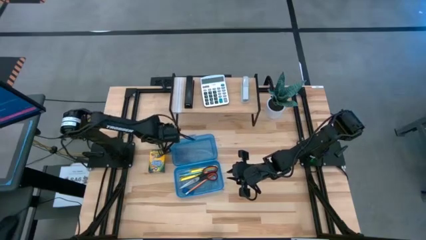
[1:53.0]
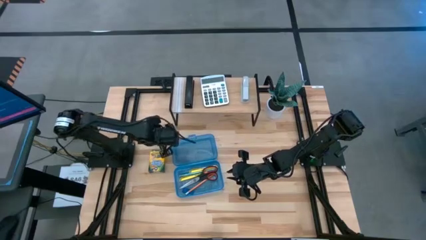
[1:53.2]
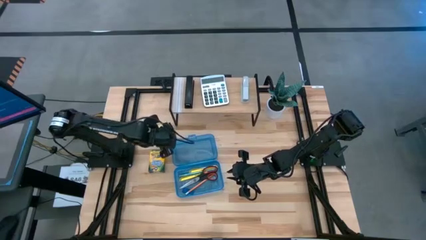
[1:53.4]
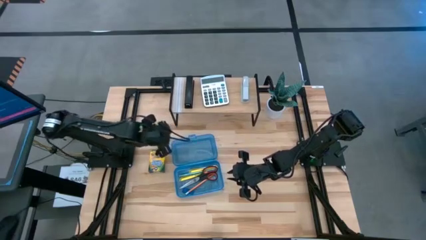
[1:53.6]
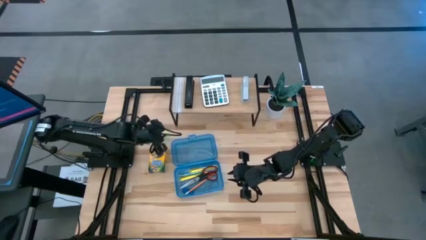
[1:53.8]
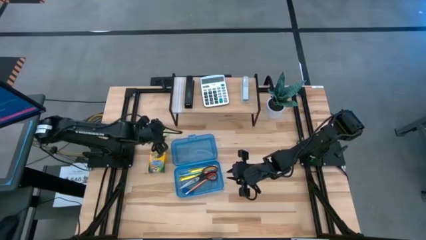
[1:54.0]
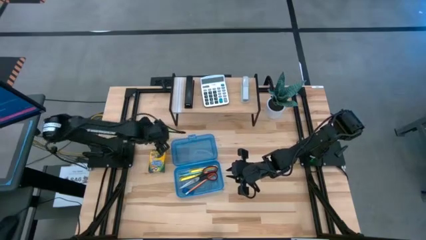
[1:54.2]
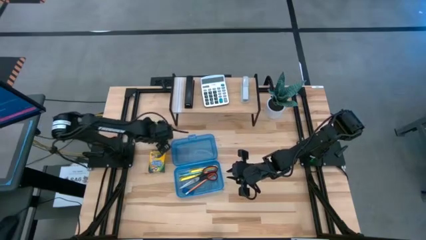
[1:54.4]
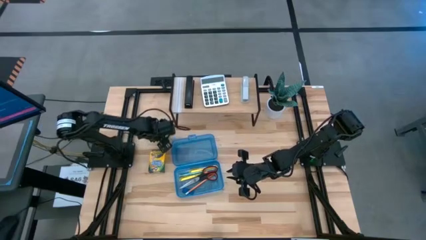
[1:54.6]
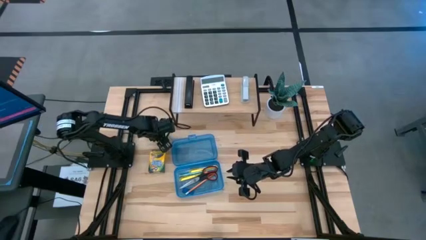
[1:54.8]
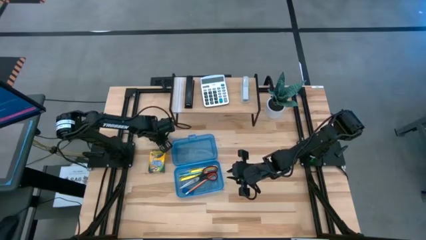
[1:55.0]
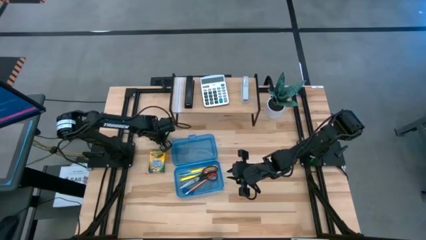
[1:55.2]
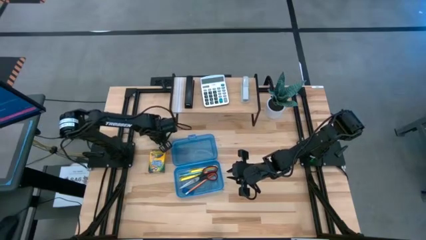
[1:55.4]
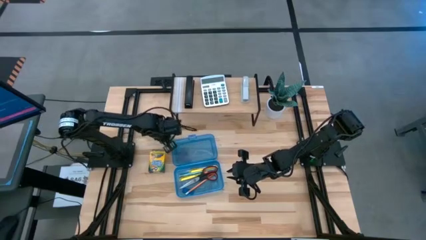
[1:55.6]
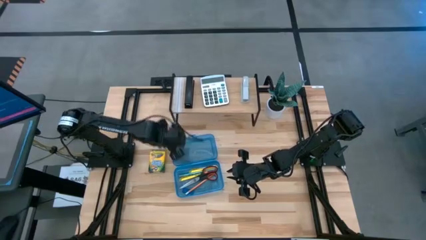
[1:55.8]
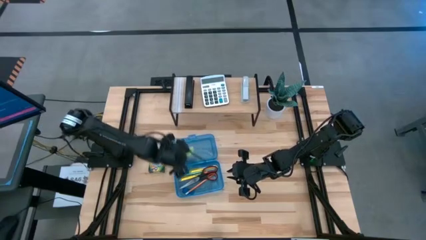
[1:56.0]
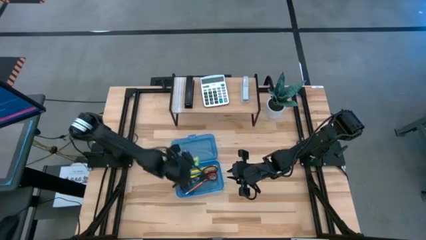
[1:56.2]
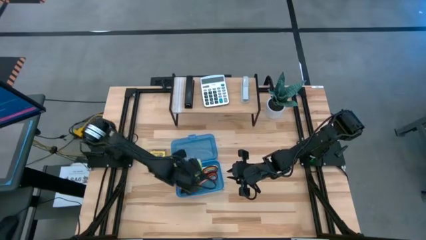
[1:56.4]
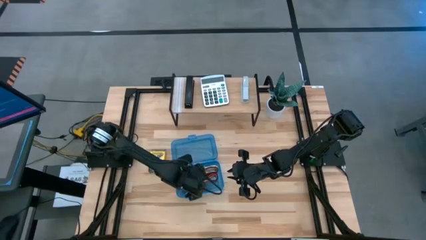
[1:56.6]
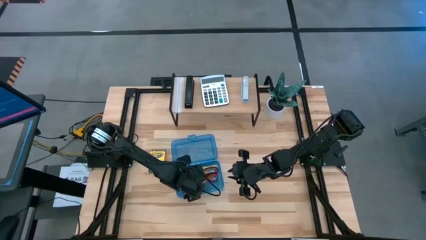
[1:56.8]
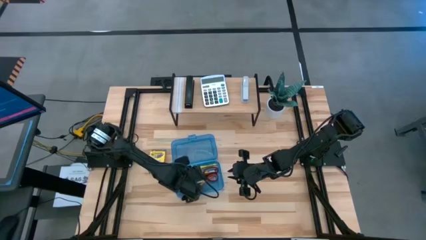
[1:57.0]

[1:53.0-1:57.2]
Task: Pack school essentials
Put the green sticky note into the blue supply box

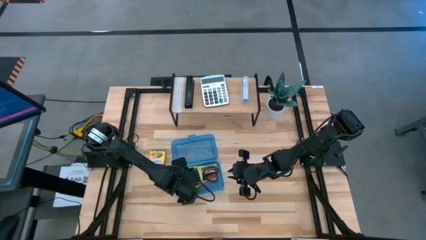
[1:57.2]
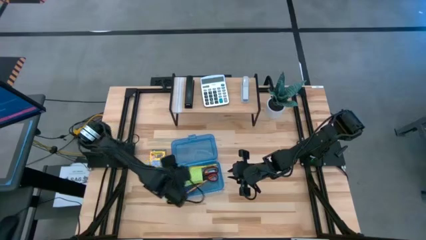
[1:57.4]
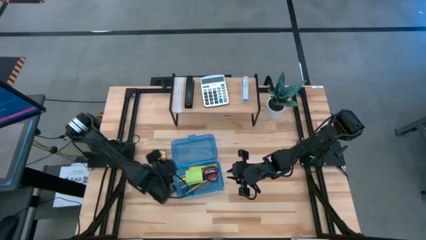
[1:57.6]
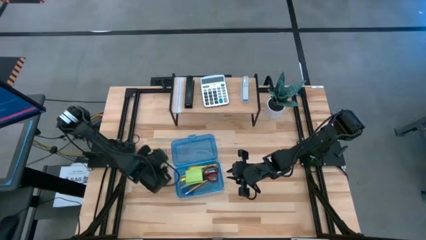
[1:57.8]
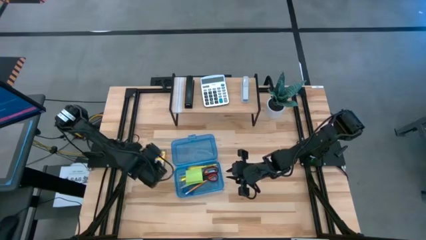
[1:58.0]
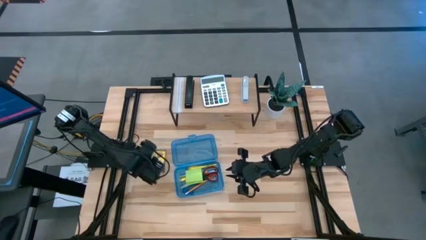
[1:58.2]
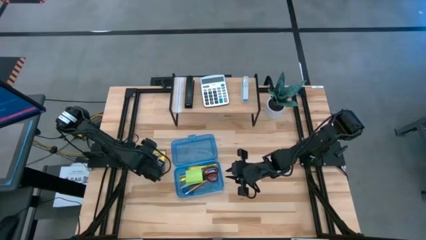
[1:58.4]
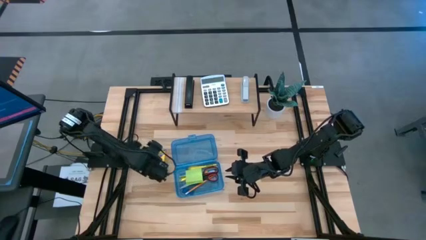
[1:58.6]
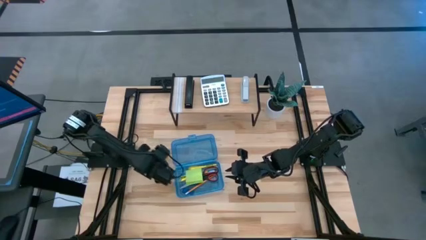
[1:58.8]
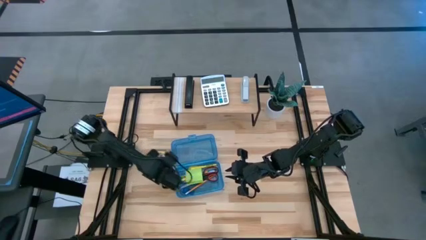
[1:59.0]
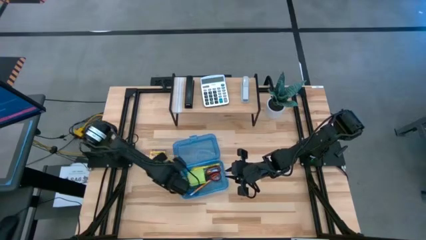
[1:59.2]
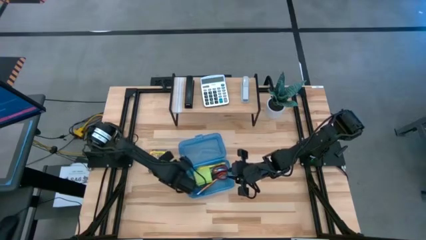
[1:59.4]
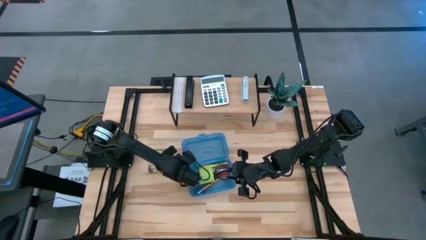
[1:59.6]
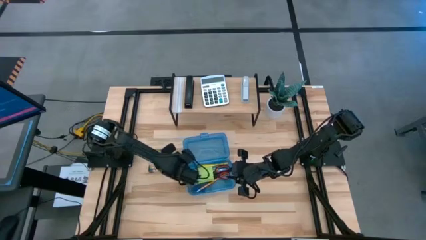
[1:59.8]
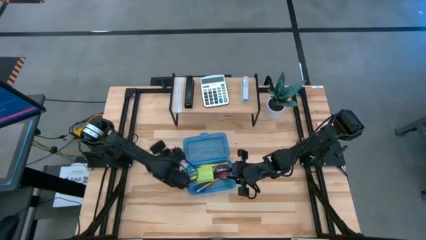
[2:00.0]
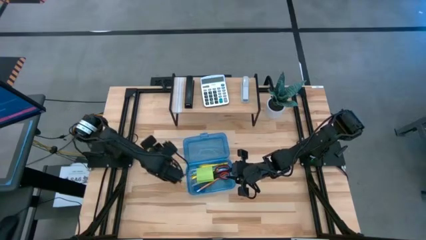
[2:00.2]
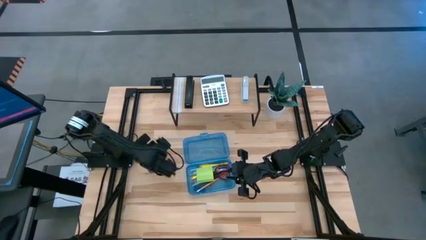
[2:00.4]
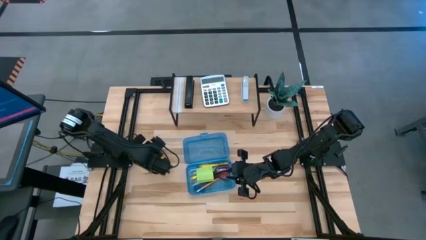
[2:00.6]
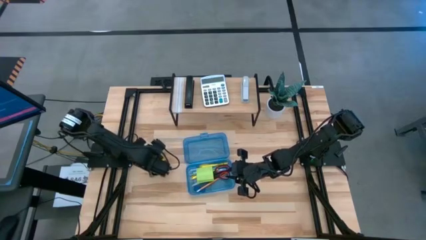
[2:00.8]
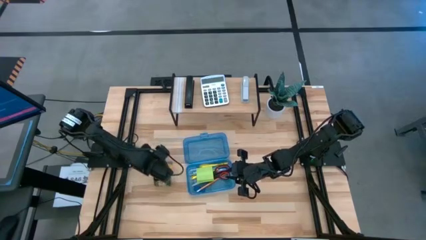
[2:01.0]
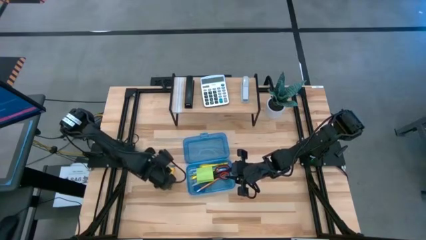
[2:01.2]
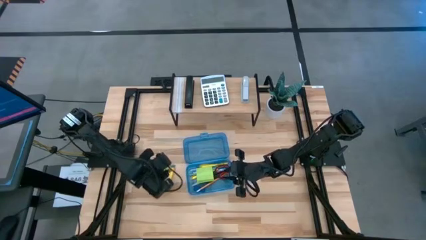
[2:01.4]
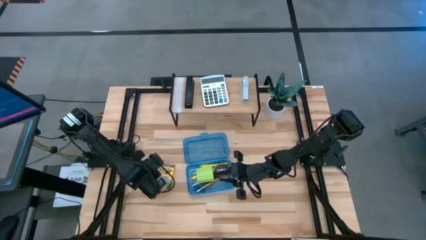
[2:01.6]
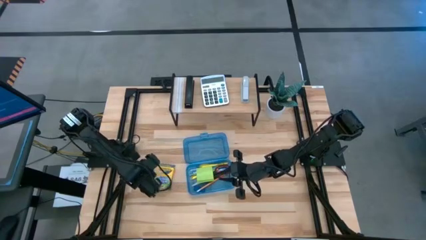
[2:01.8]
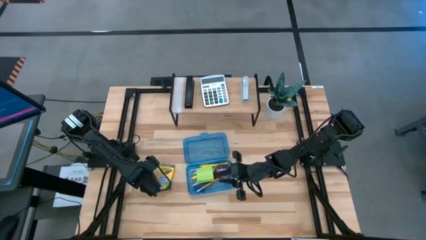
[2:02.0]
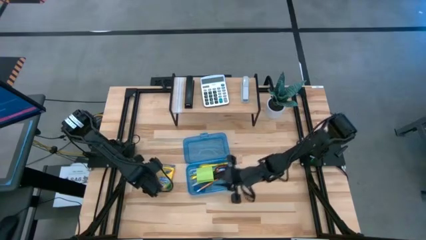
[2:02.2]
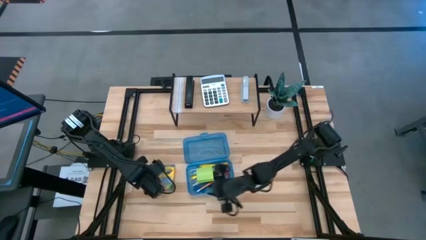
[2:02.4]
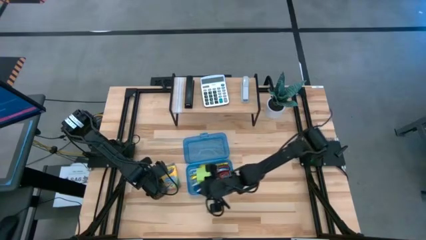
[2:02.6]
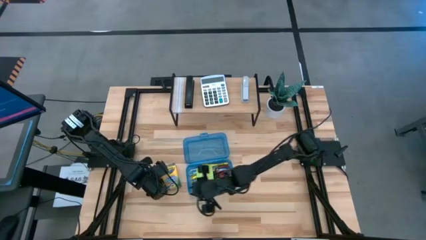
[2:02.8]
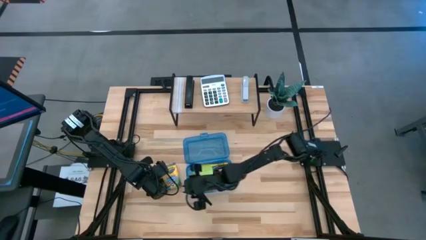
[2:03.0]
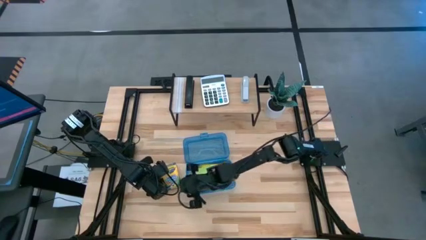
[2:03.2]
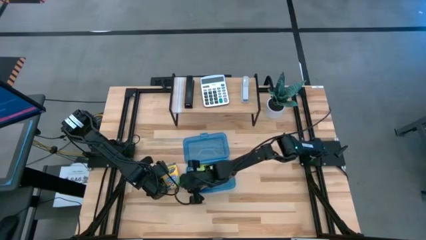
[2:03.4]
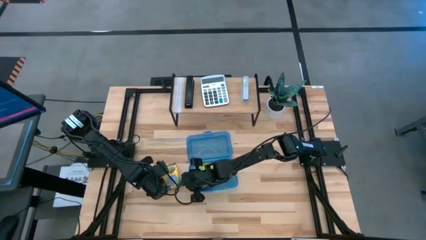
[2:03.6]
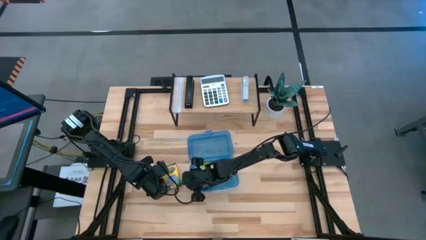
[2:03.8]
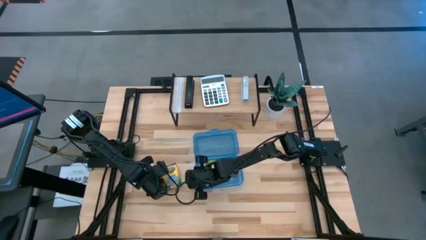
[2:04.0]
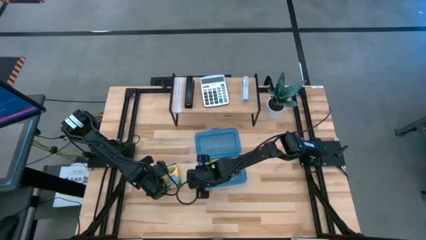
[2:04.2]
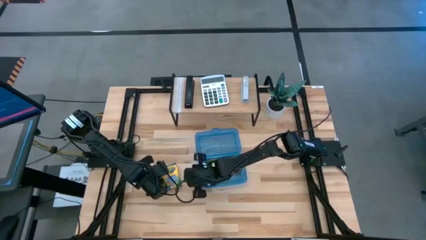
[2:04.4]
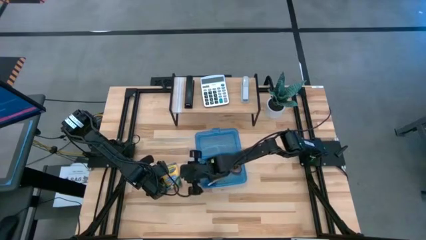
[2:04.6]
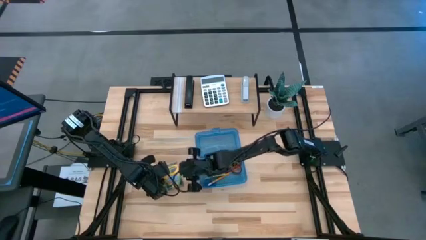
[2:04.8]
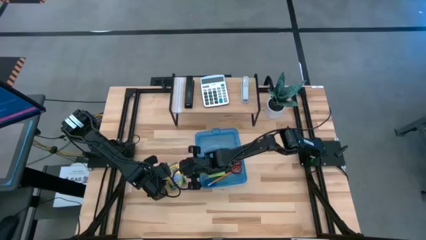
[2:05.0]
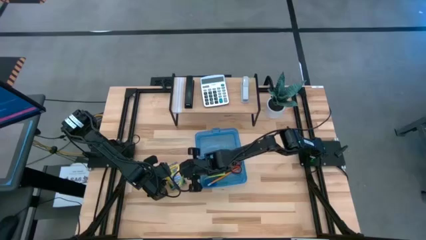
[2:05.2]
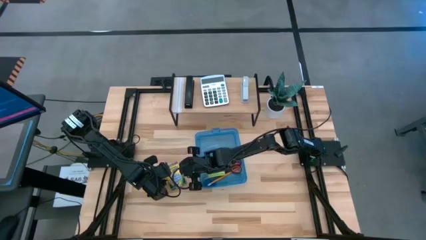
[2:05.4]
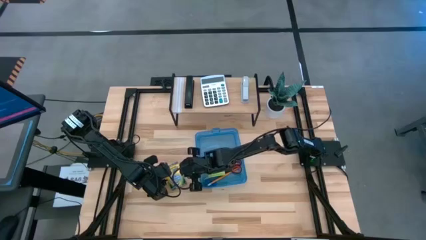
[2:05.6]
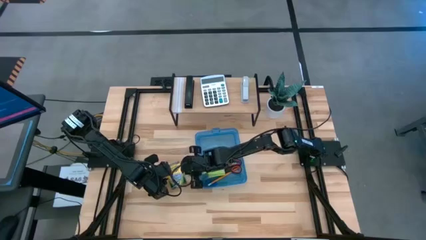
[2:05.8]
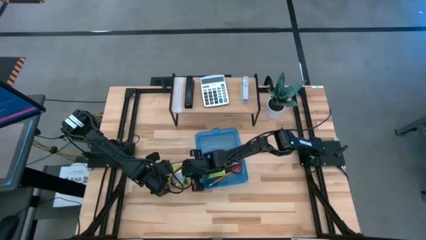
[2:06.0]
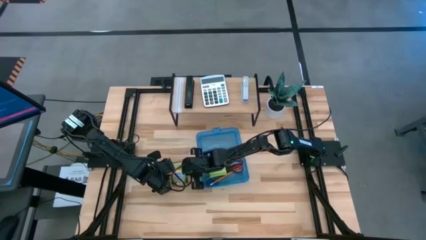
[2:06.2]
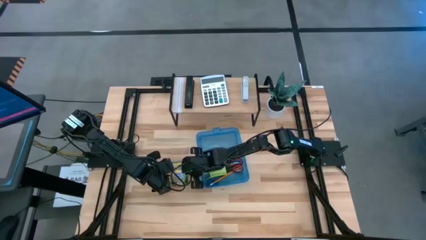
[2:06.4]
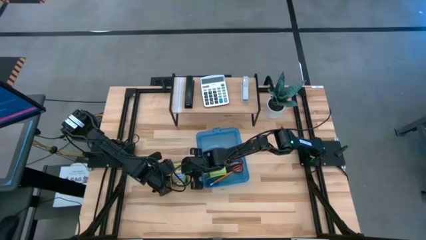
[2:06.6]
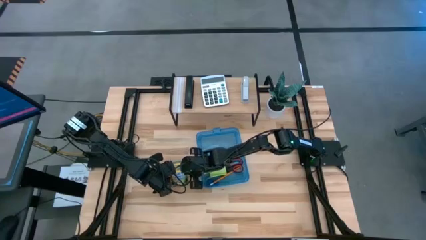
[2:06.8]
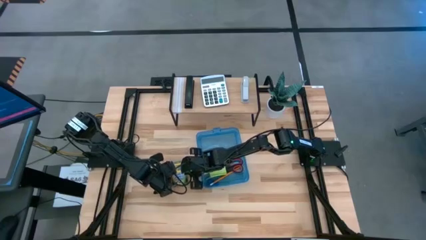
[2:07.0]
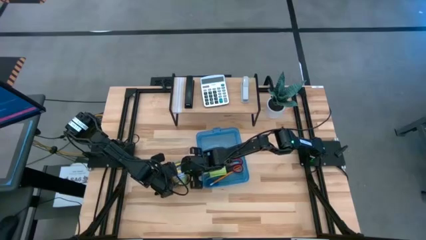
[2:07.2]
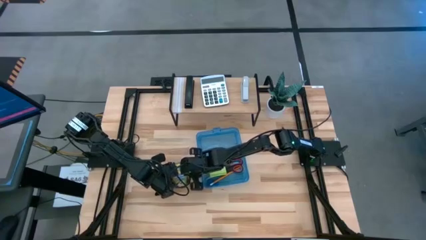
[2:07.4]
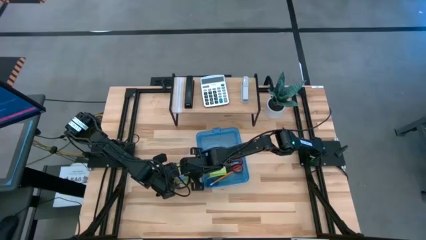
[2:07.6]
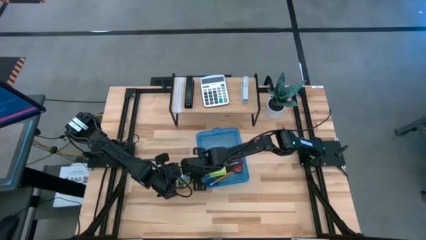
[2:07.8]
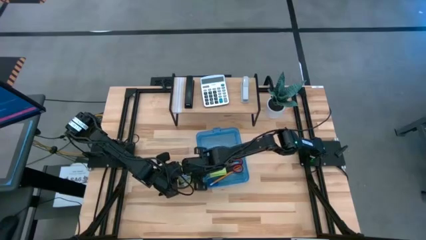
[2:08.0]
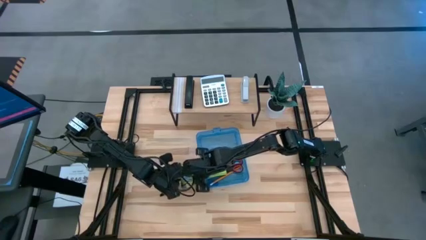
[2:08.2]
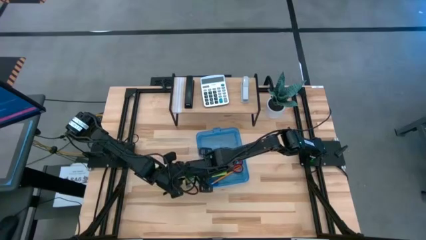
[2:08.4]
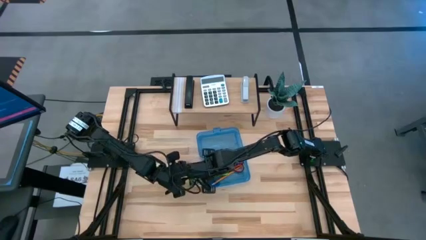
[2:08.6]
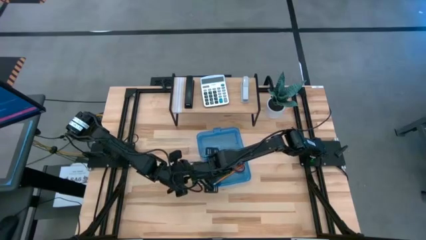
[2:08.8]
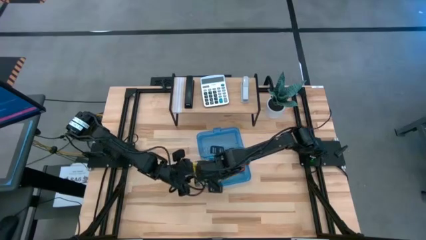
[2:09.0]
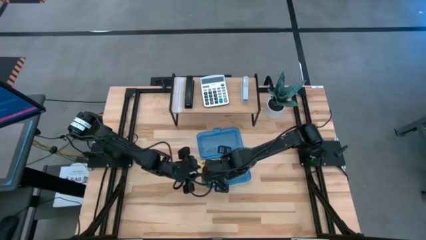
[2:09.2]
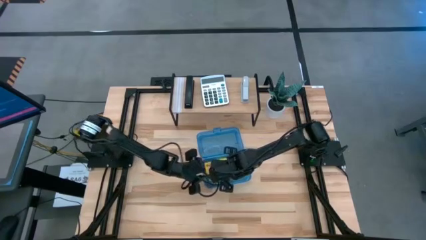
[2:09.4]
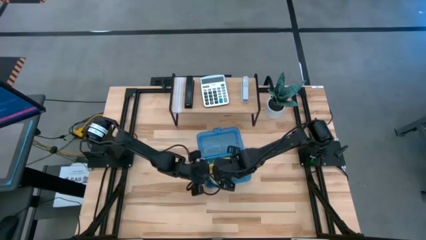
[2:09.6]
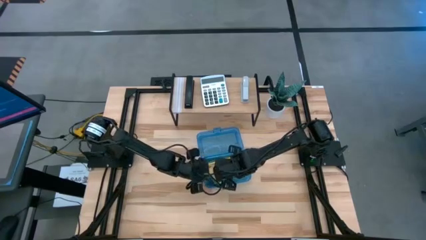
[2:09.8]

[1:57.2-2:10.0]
Put the yellow crayon box into the blue supply box
